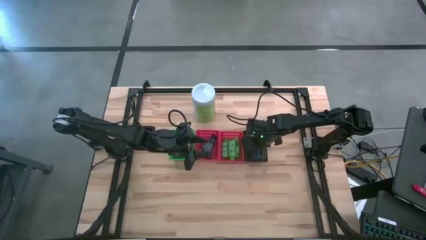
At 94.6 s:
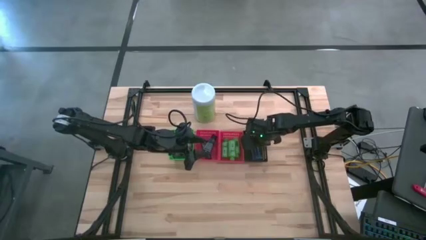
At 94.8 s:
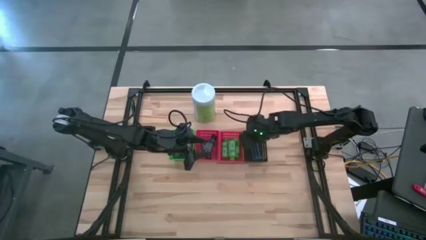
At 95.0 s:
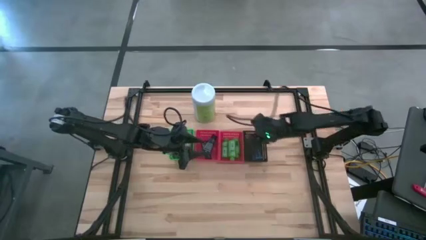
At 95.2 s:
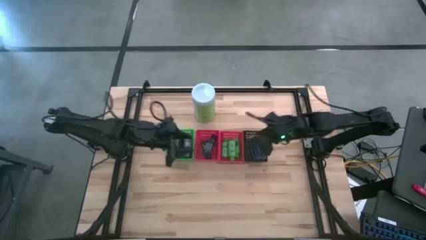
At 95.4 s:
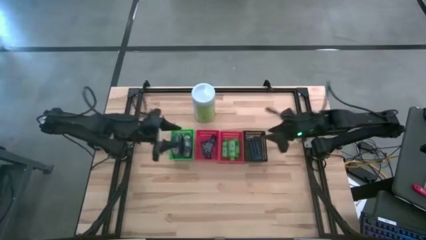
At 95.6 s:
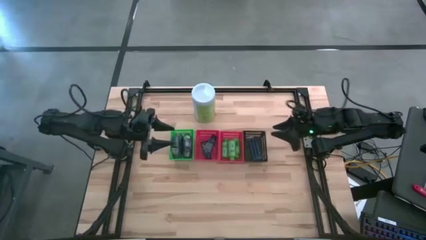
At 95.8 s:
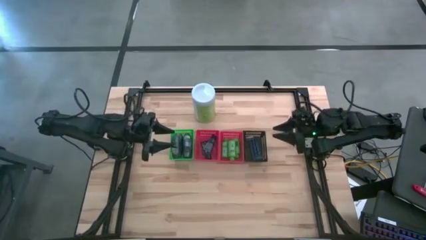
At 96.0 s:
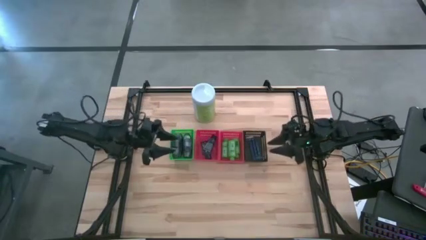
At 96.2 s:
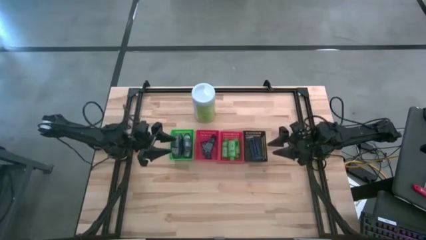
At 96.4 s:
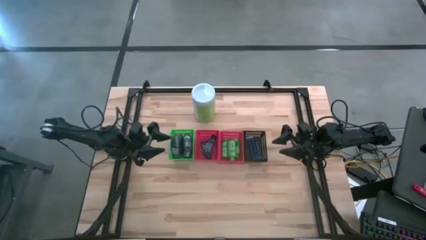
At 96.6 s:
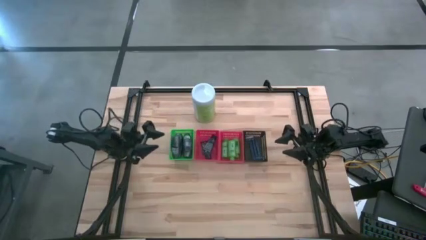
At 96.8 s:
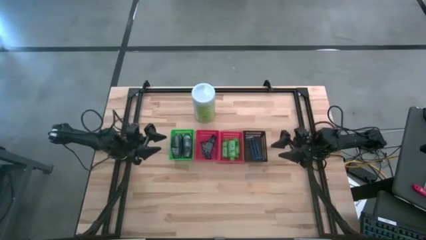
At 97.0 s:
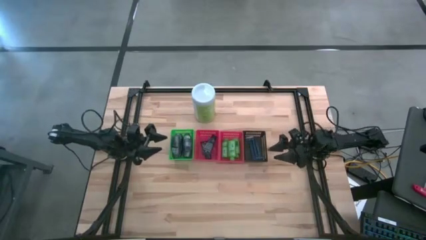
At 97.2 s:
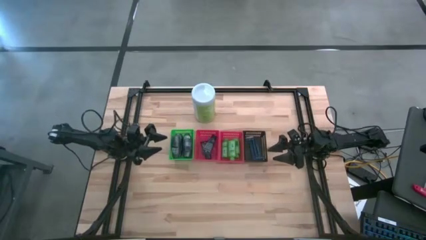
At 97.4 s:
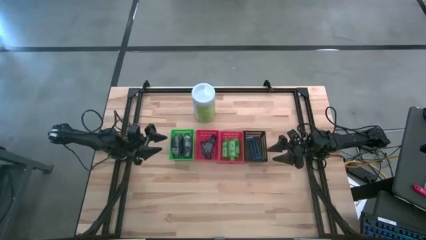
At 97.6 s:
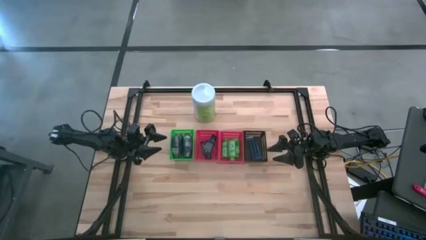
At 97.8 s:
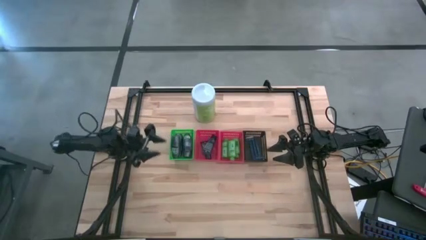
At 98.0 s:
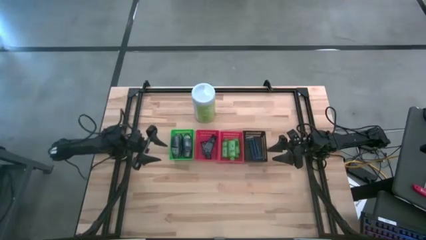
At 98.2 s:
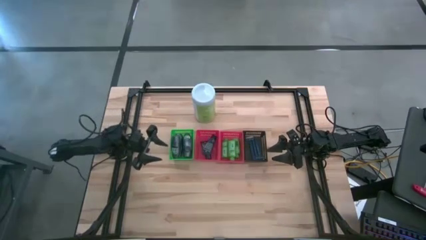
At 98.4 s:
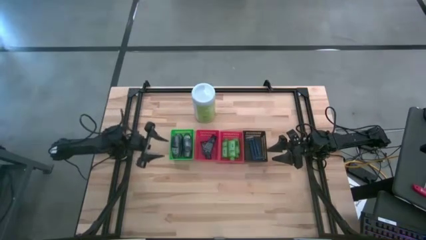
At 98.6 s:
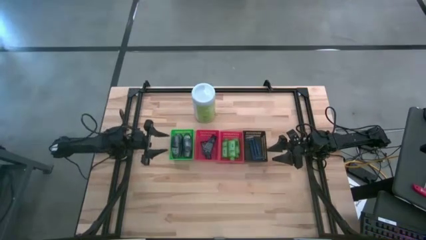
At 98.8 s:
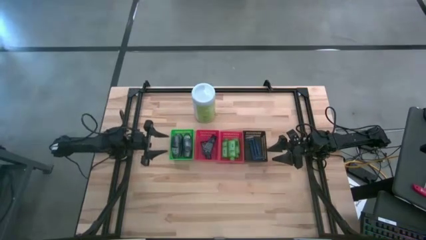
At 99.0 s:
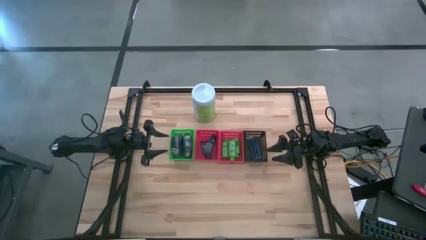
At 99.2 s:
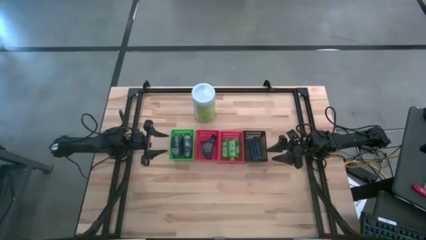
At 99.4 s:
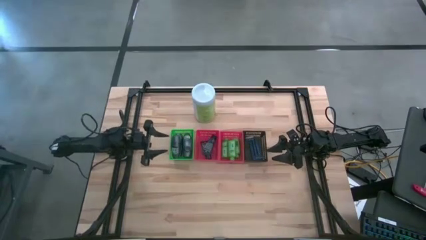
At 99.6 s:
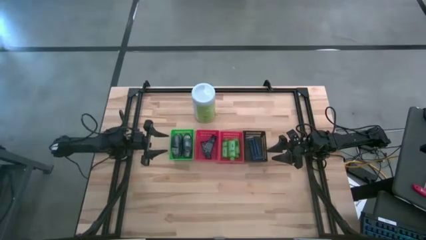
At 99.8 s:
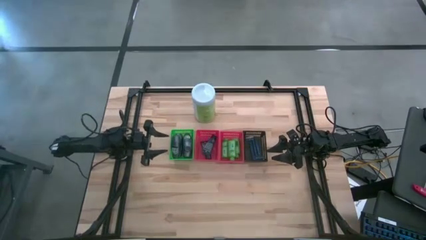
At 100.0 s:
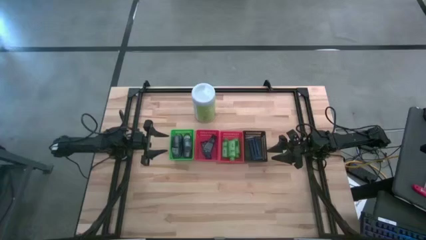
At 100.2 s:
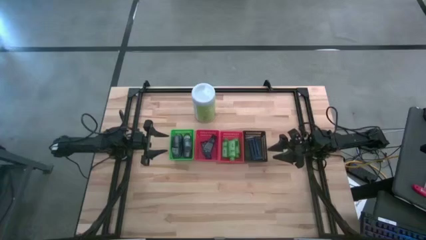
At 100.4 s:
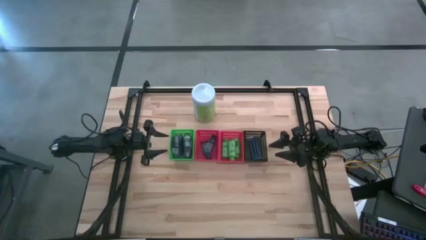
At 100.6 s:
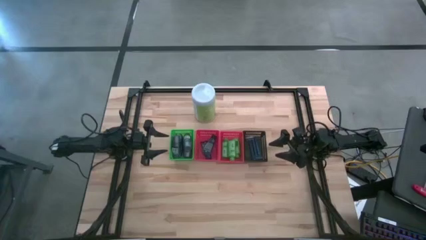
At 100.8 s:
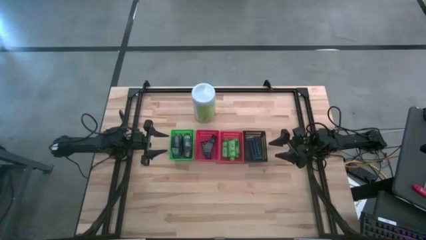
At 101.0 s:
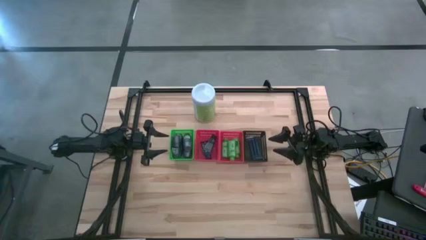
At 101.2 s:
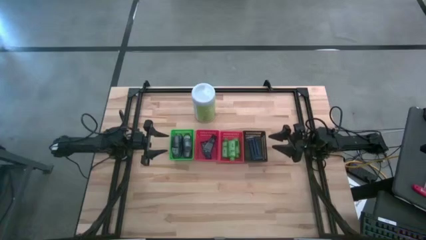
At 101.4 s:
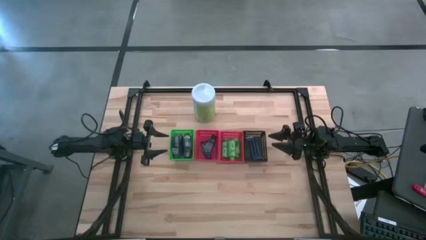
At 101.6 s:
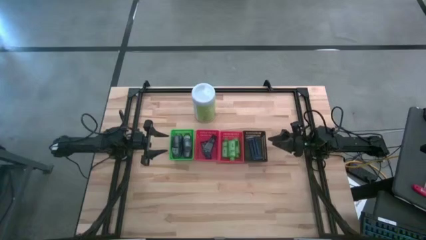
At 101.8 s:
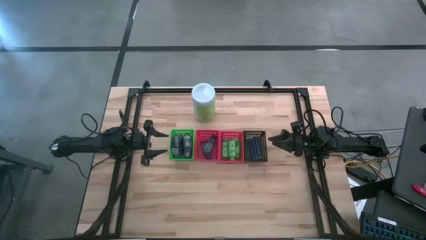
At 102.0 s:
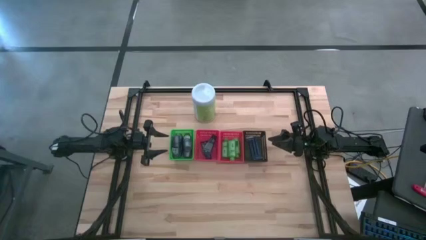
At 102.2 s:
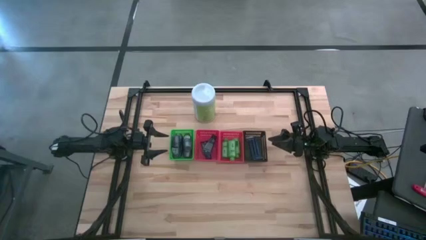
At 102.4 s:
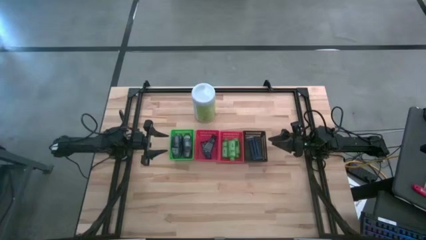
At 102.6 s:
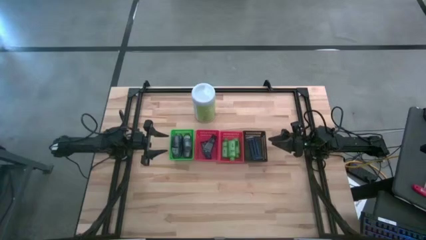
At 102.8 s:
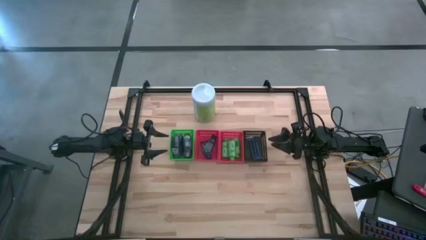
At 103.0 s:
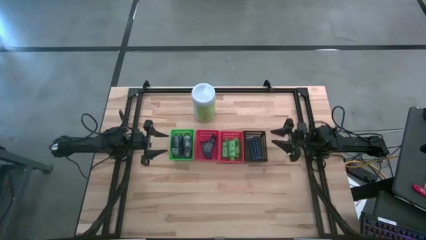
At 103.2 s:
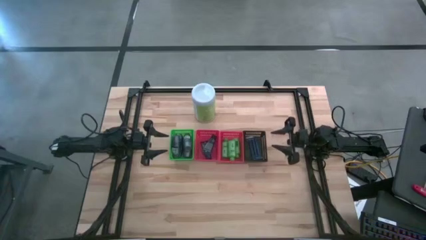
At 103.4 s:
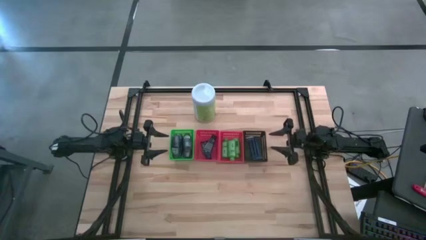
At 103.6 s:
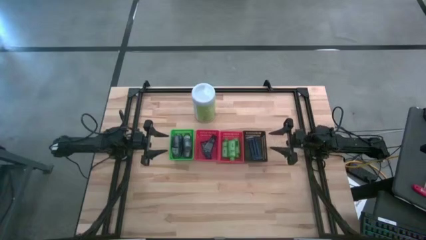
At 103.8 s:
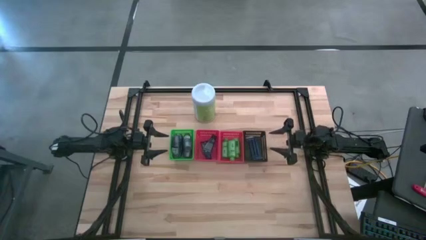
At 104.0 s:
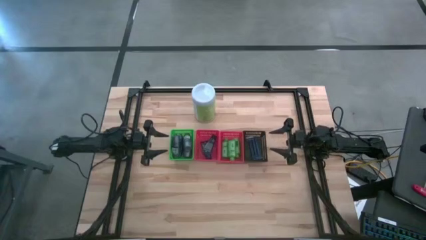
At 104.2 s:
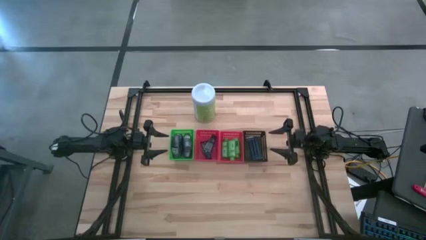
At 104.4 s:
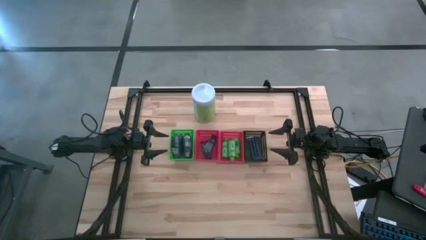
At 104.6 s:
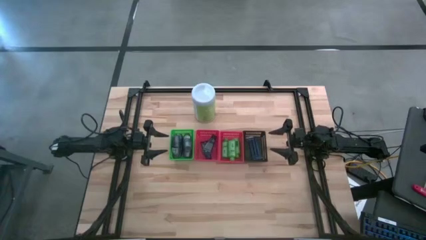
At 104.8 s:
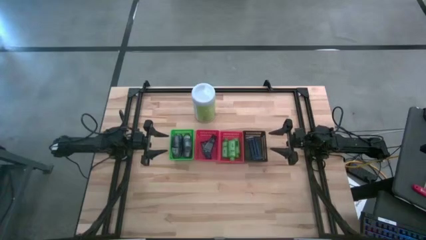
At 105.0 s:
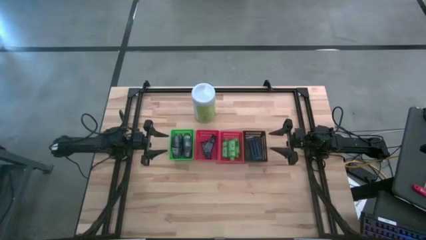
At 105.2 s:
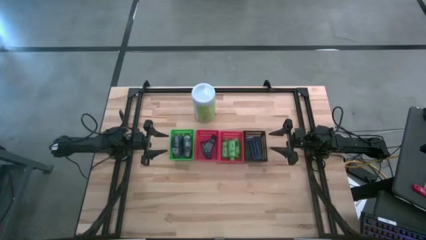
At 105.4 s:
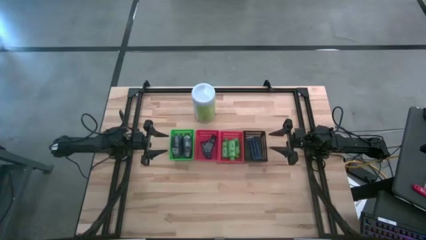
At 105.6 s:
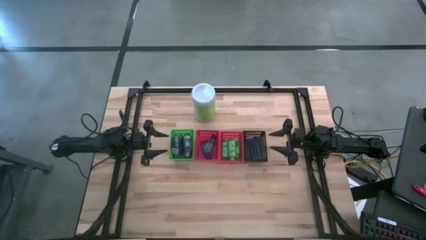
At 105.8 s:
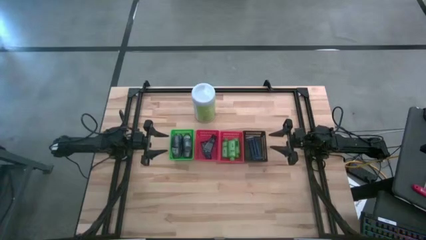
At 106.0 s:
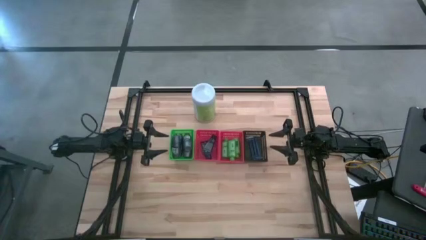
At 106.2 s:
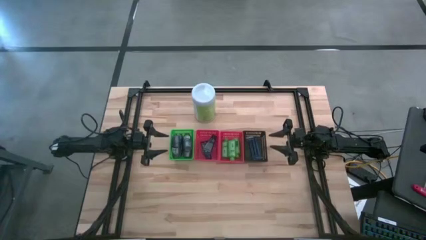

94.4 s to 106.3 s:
Task: Pick & Place Travel size toiletries
Return to Home Position

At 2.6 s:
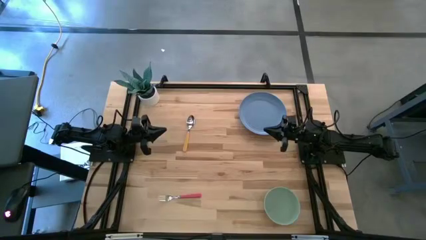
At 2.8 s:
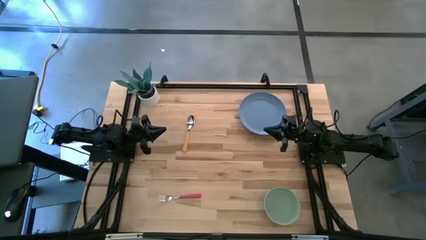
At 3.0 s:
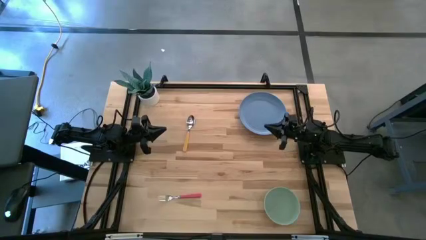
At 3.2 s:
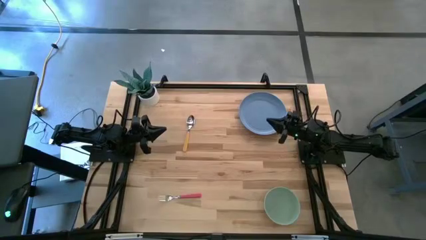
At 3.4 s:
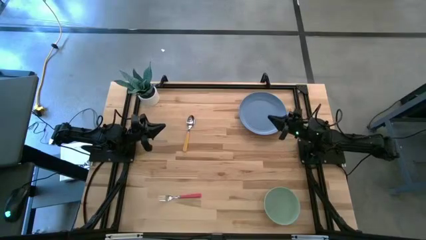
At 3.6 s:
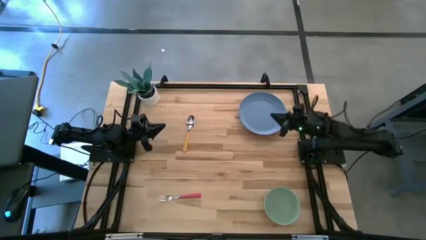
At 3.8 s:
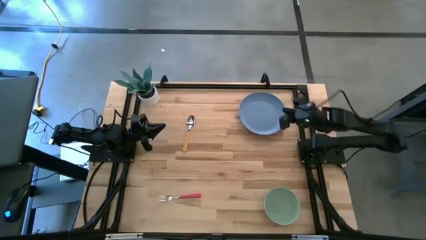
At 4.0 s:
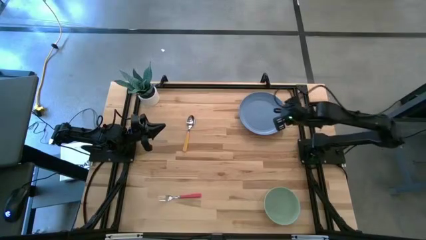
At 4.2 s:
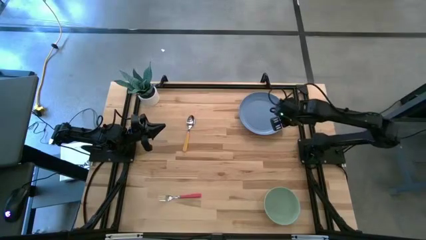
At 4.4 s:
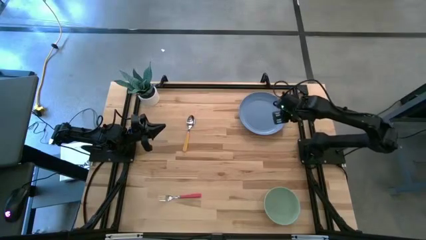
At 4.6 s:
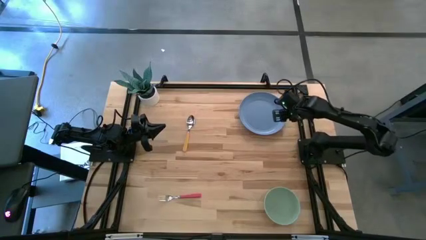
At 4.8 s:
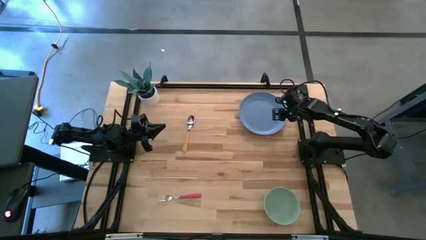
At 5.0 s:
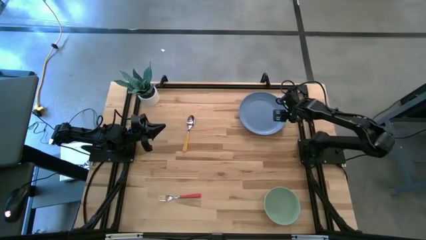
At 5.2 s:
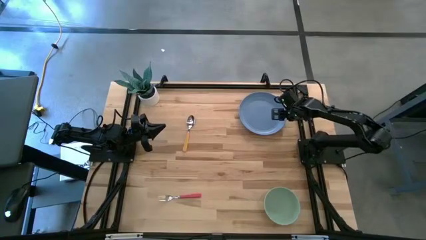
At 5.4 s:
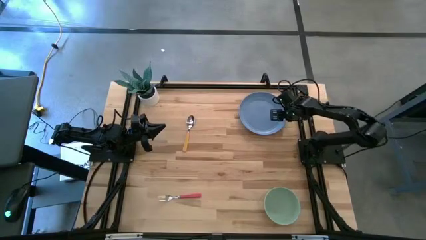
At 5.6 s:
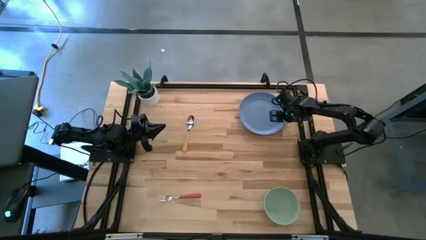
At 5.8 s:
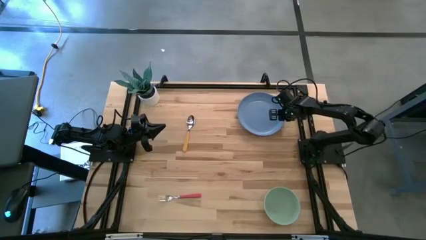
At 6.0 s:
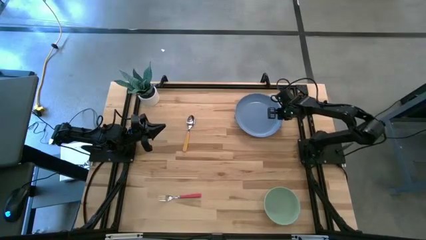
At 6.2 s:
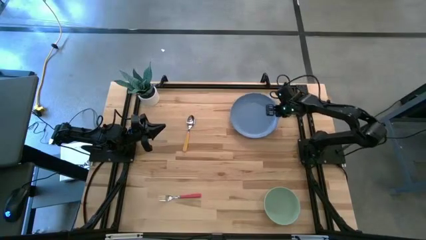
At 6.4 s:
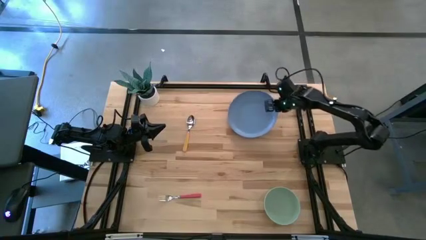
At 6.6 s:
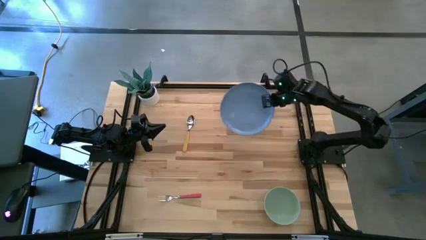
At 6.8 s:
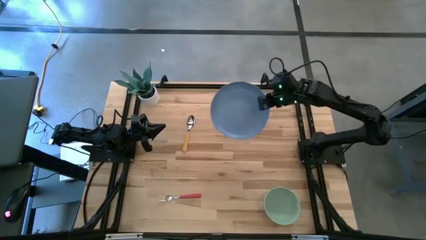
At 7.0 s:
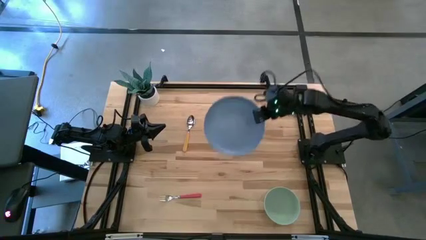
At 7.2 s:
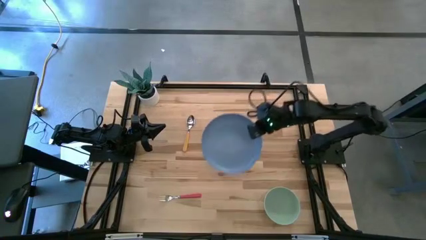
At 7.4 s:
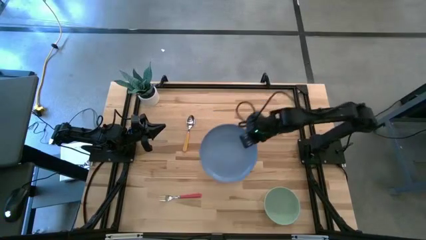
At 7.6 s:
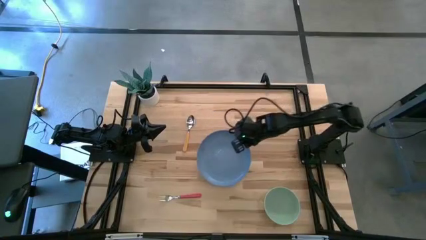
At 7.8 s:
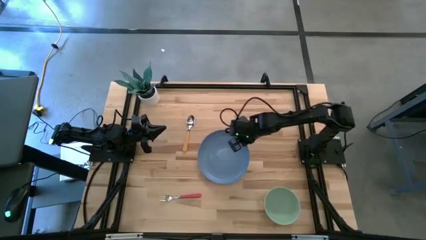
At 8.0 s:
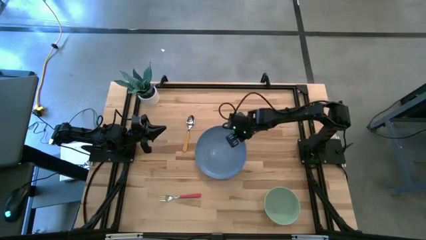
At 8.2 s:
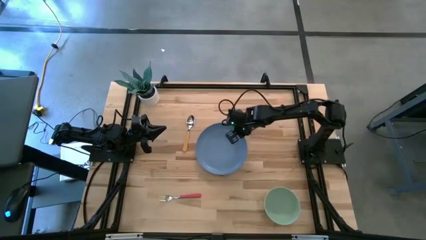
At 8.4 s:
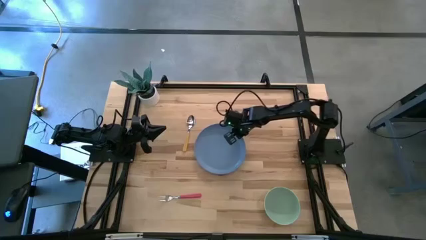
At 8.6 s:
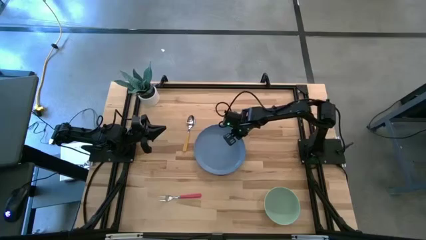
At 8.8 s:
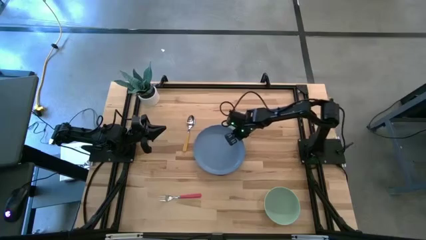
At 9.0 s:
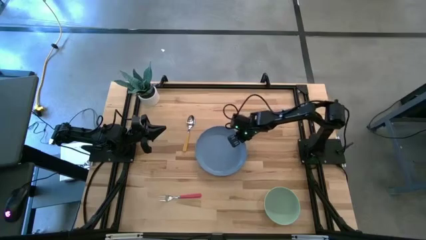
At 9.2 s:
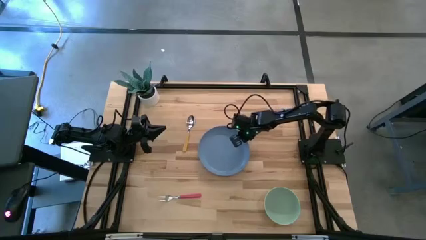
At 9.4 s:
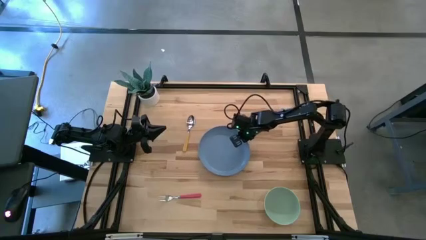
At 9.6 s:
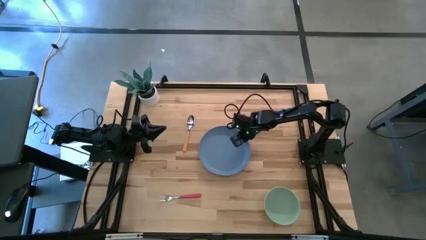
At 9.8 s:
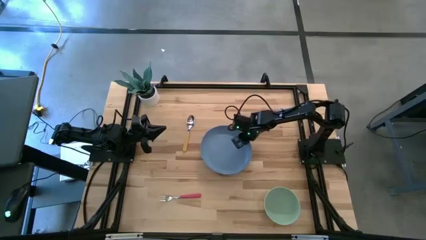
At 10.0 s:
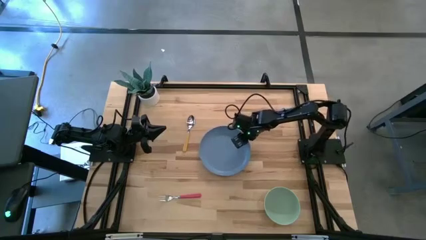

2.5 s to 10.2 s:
Task: Set table place
Put the blue plate in the center of the table
